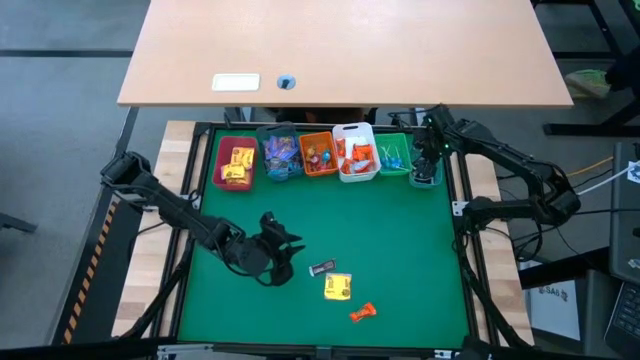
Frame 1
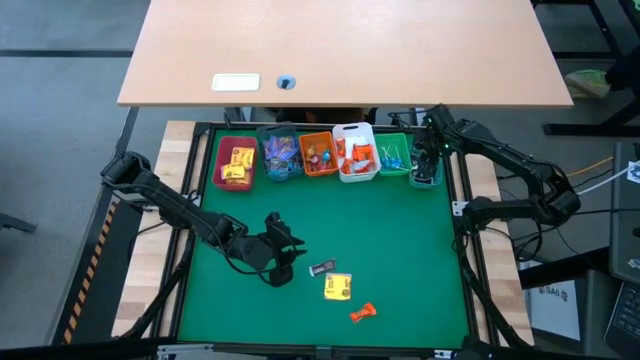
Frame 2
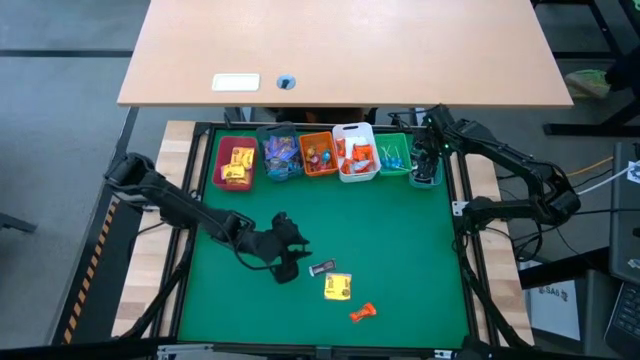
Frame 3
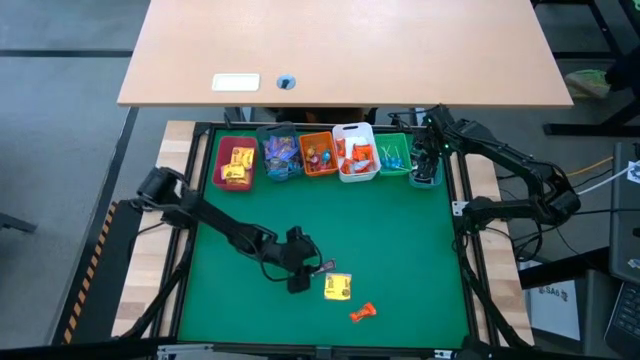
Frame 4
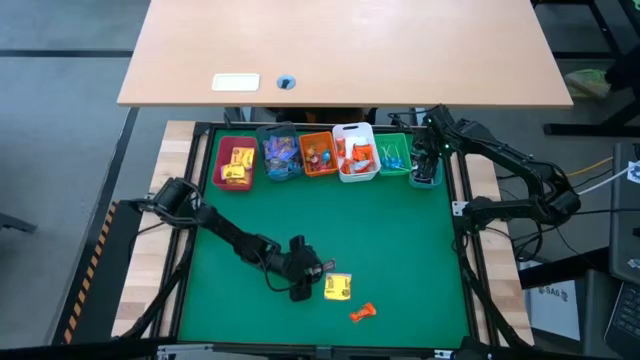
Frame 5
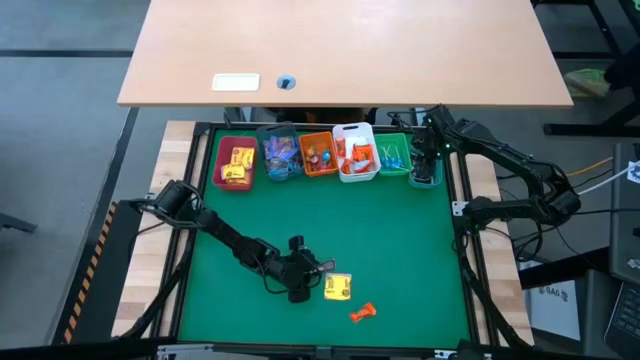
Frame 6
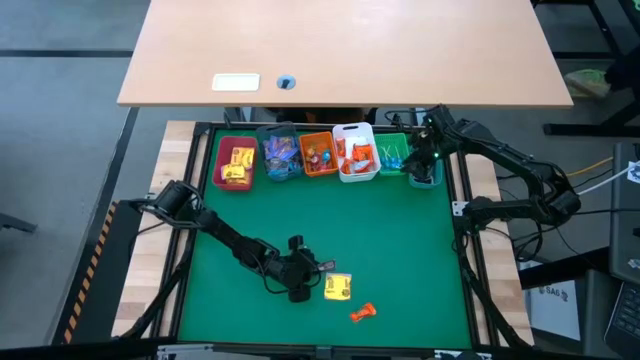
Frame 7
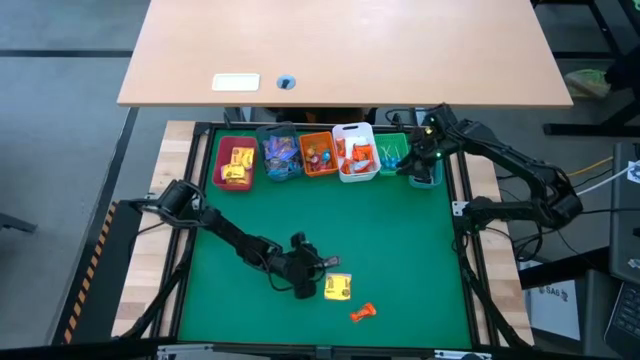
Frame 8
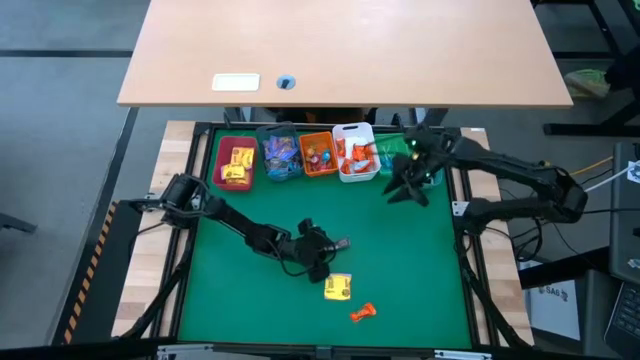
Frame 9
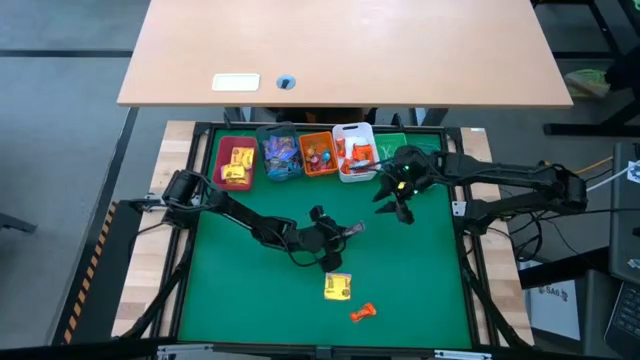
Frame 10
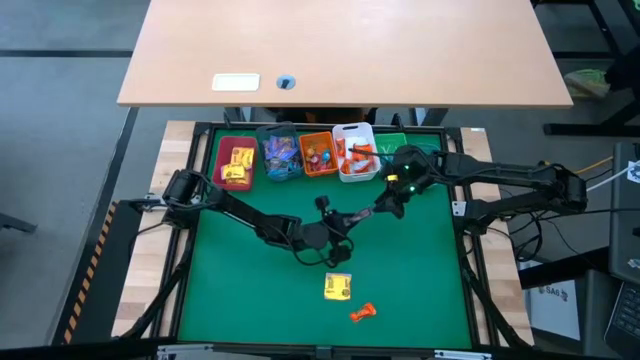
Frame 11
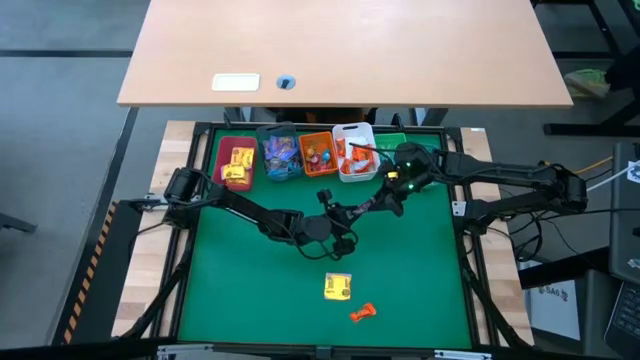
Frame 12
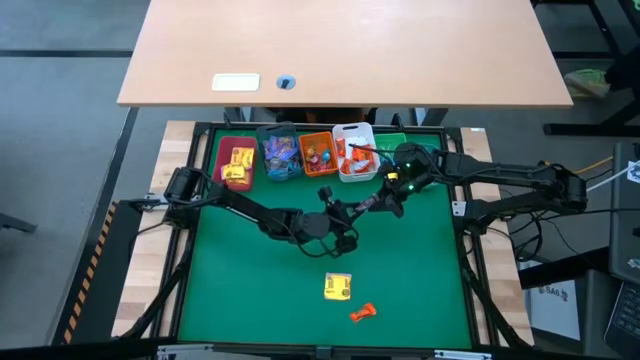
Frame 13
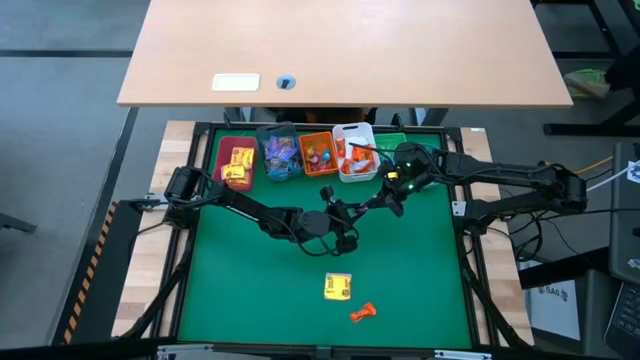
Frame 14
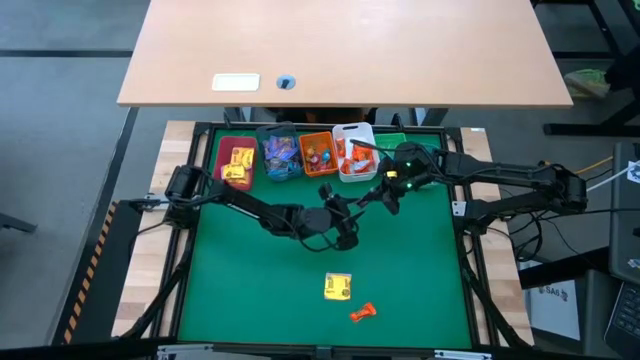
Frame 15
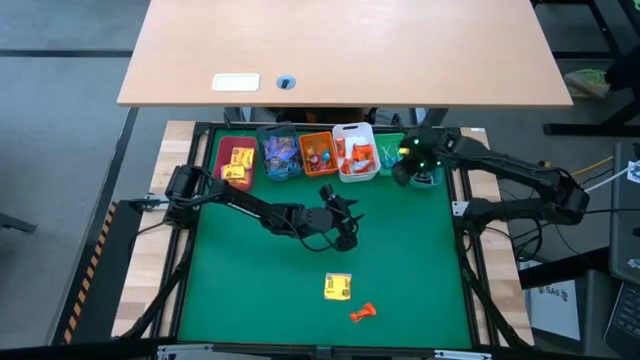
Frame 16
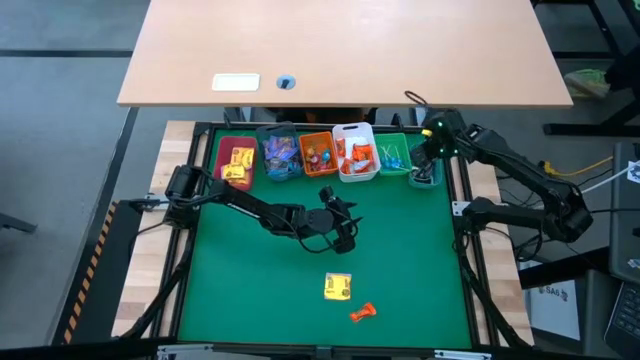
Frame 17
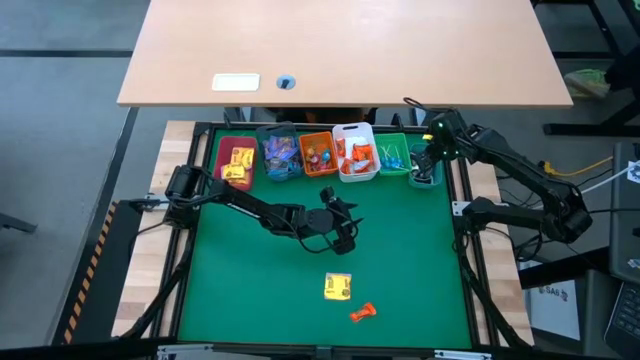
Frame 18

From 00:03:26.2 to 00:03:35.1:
Task: Sort candy
Put the brown chocolate into the blue

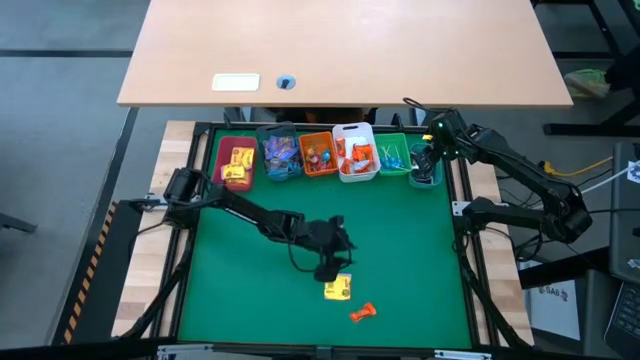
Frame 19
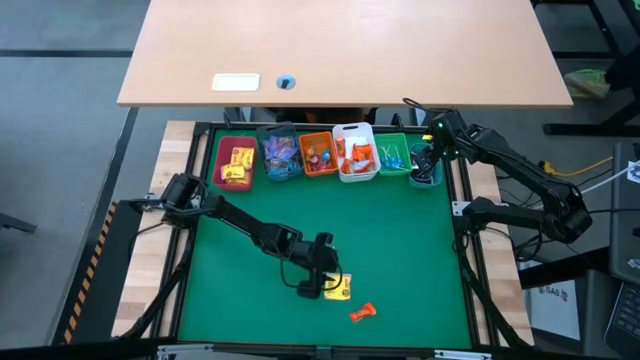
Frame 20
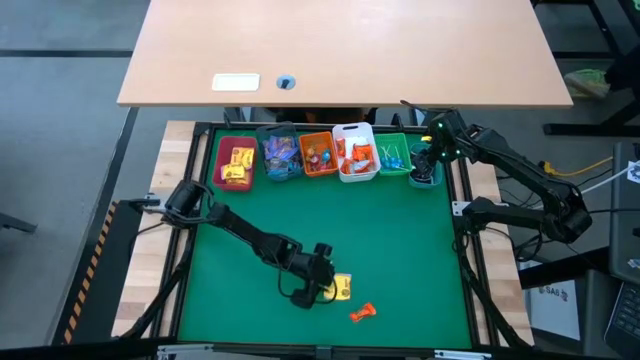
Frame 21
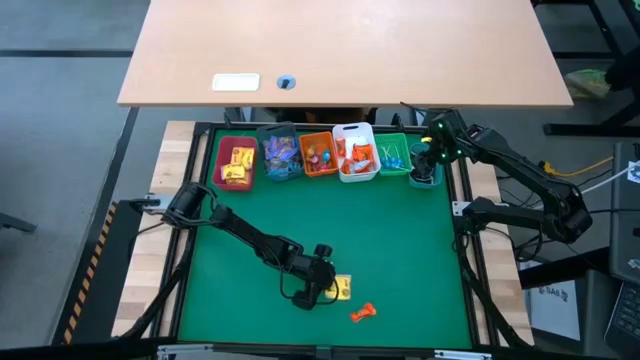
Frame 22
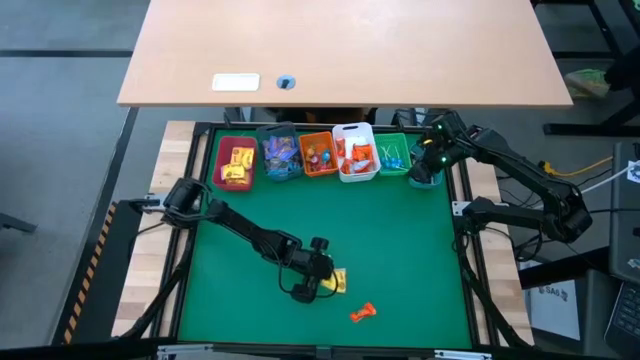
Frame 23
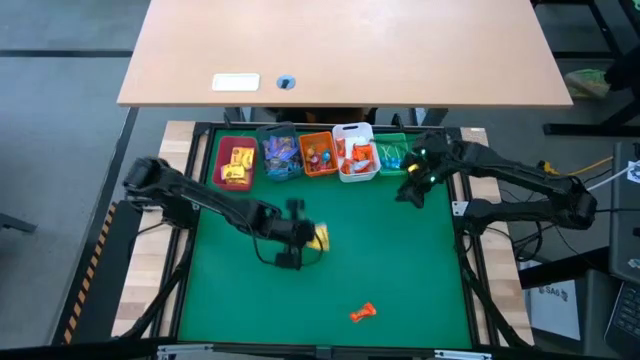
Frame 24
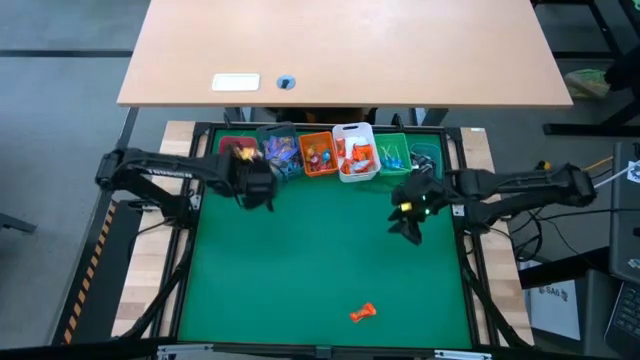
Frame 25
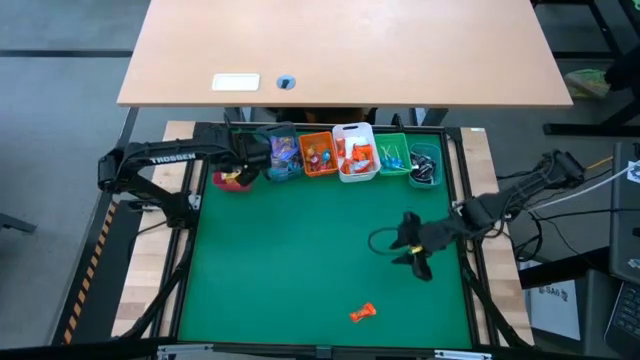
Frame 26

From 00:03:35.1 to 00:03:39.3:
Put the yellow candy into the red bin

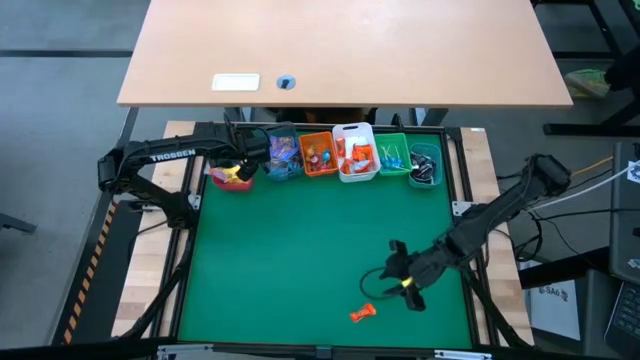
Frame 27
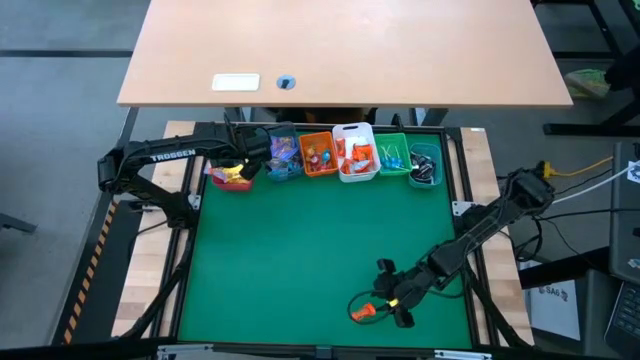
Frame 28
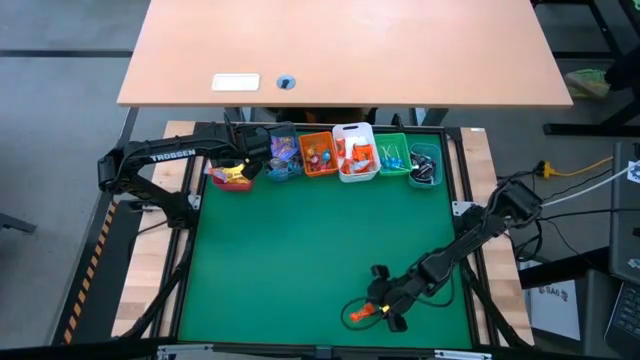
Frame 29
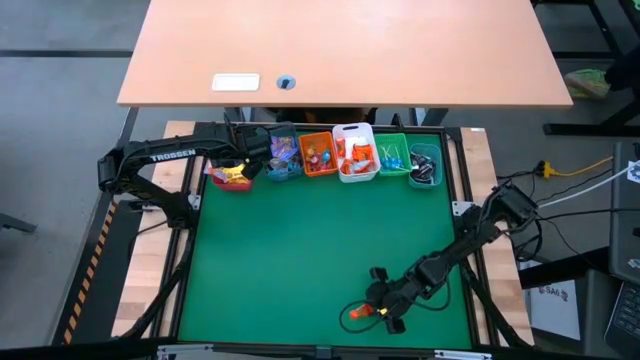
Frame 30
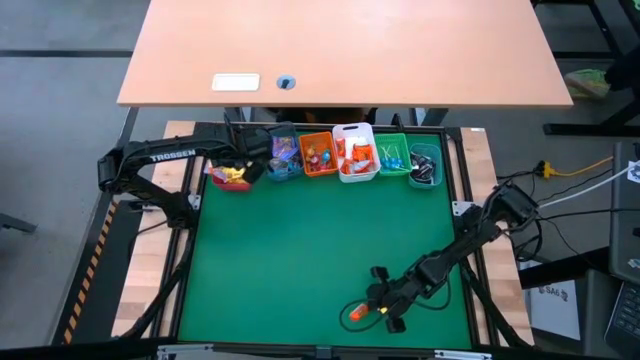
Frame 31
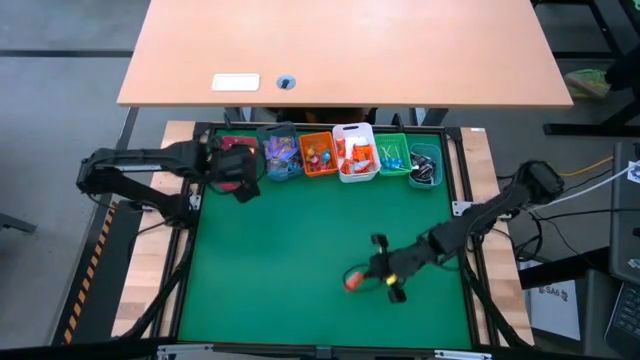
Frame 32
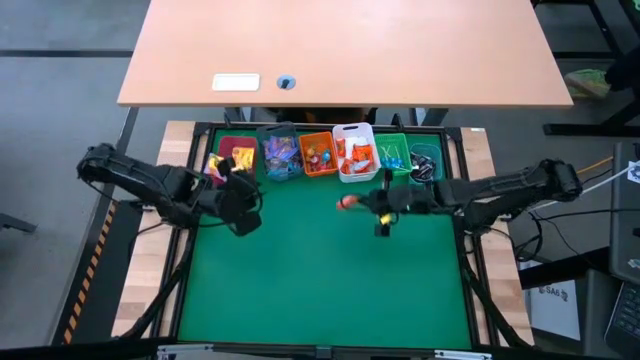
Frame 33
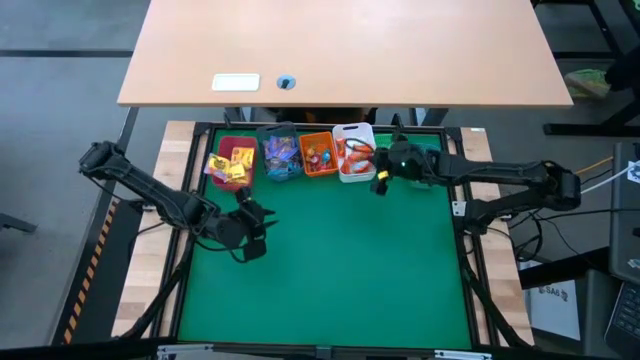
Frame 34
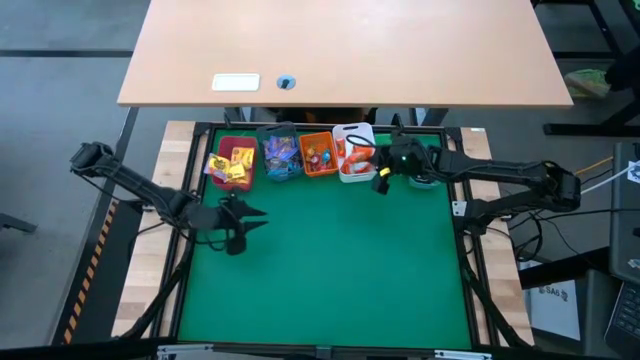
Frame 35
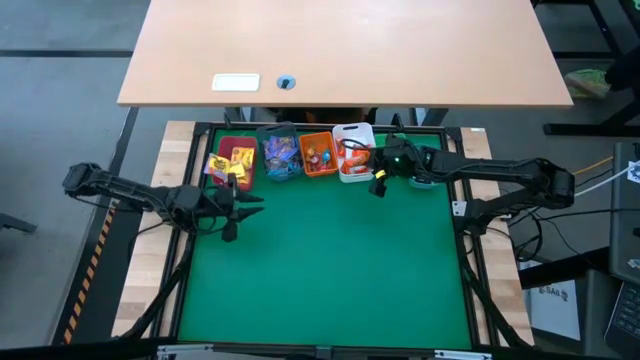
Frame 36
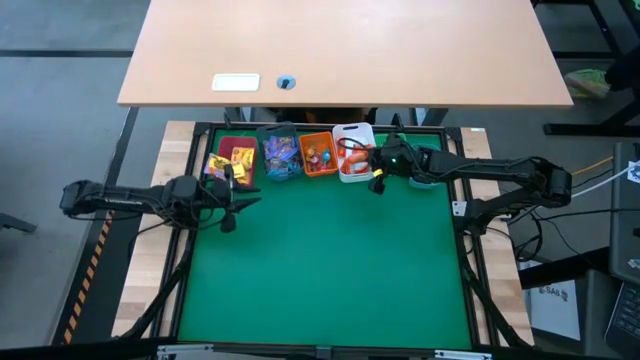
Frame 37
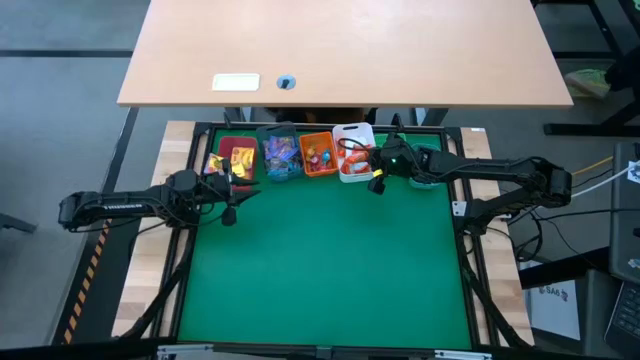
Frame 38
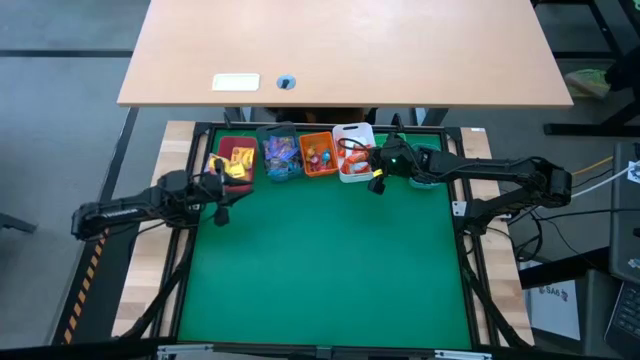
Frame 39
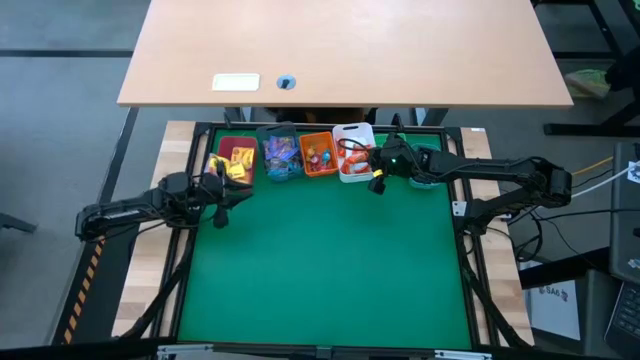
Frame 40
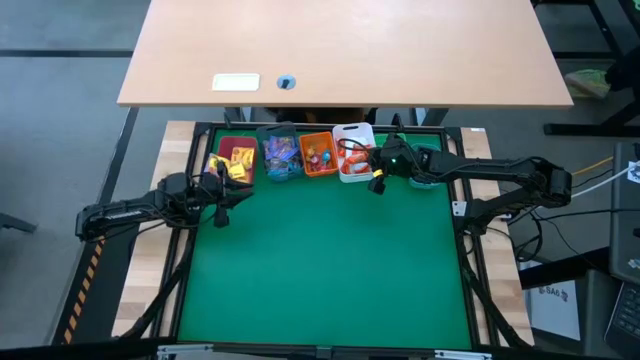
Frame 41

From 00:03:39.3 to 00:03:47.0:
Put the orange chocolate into the white bin
